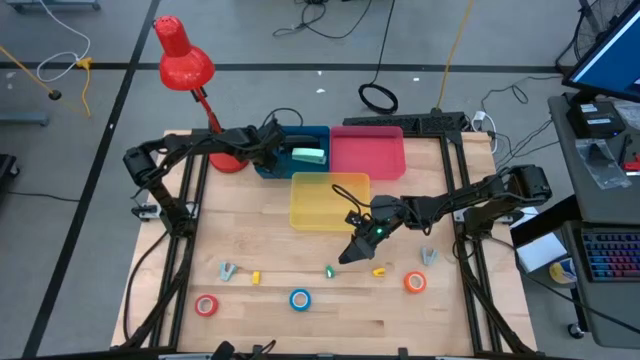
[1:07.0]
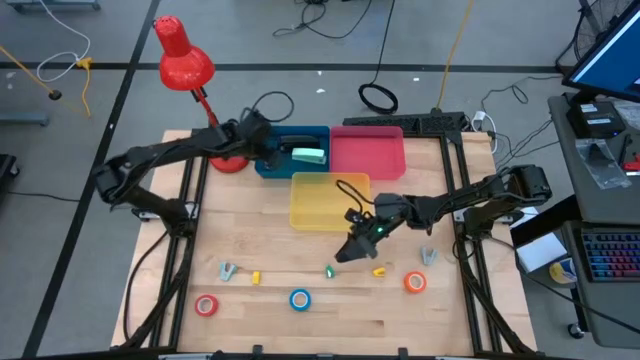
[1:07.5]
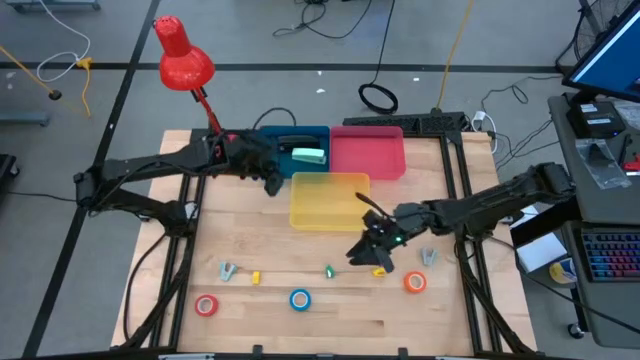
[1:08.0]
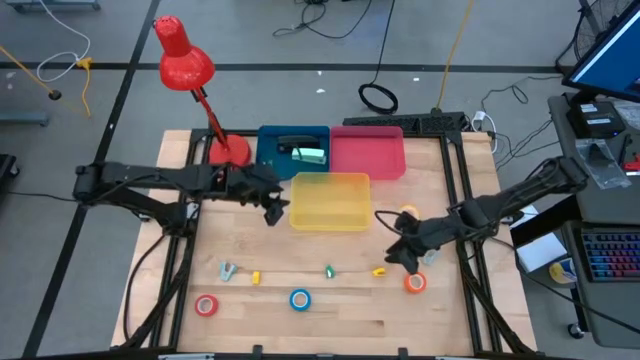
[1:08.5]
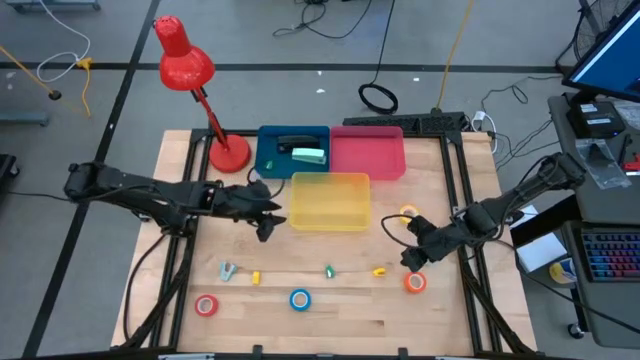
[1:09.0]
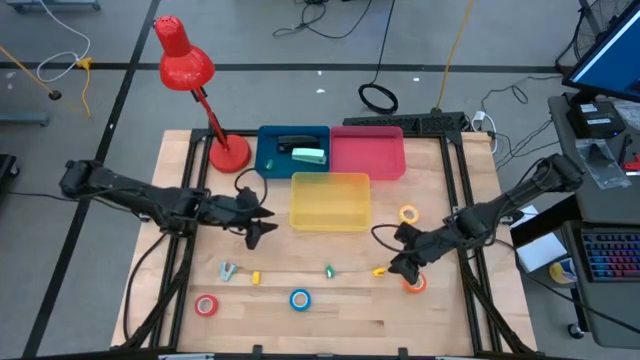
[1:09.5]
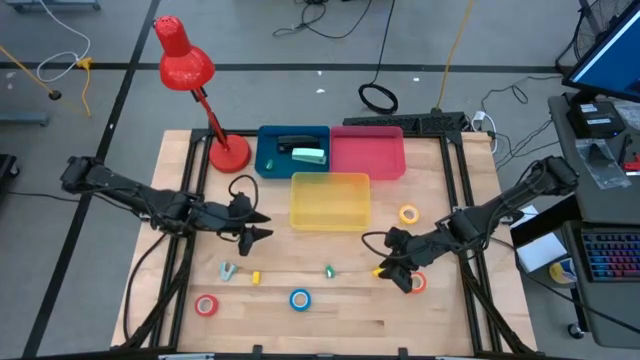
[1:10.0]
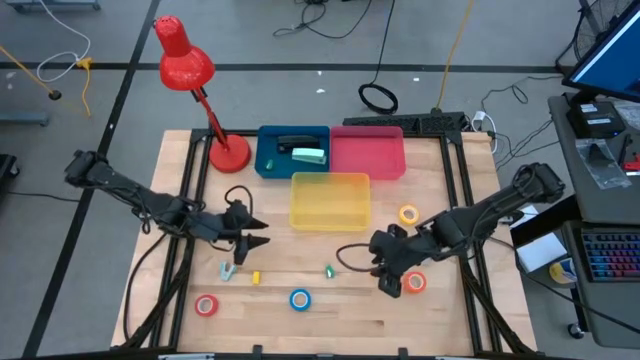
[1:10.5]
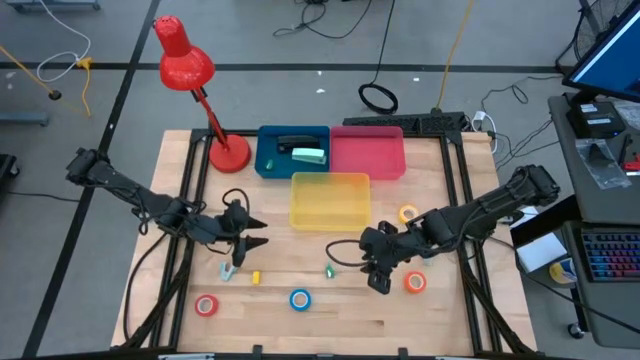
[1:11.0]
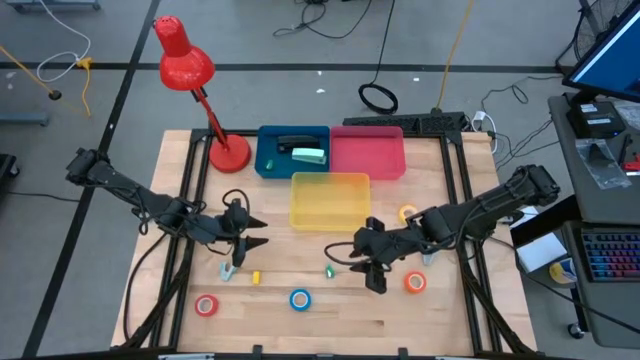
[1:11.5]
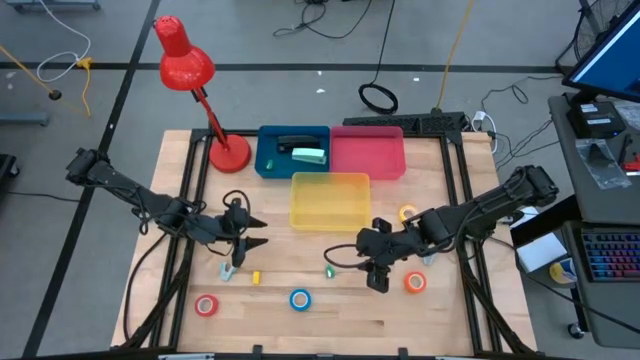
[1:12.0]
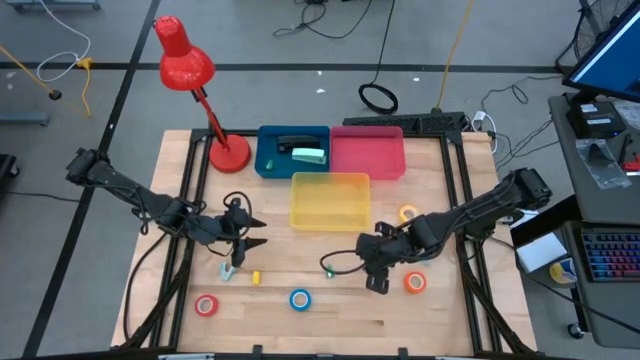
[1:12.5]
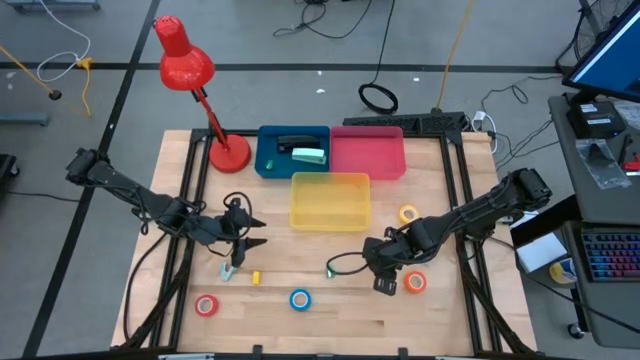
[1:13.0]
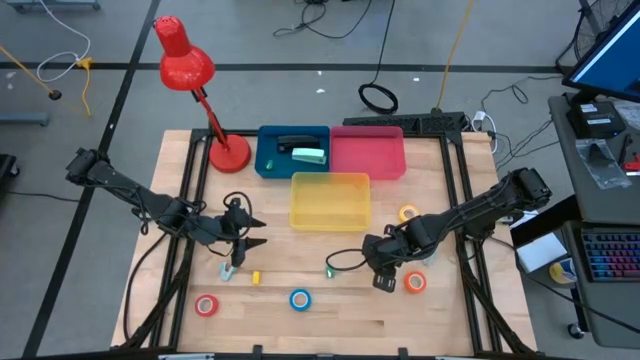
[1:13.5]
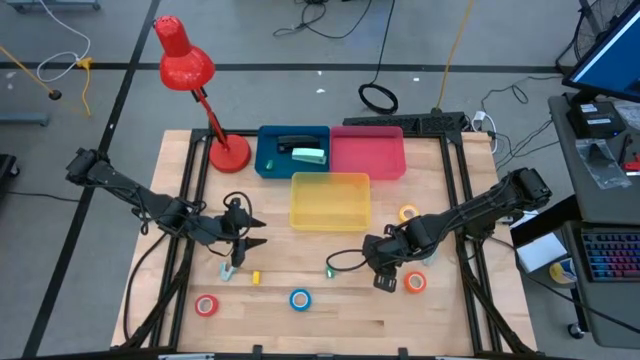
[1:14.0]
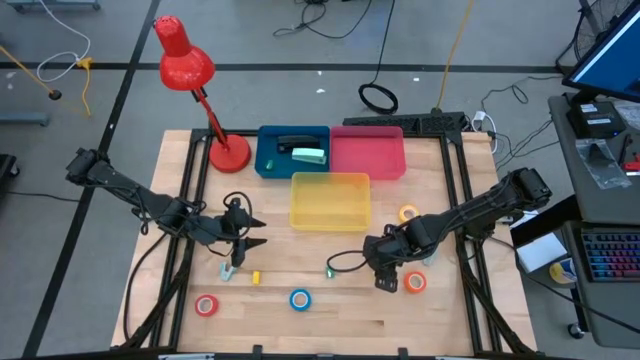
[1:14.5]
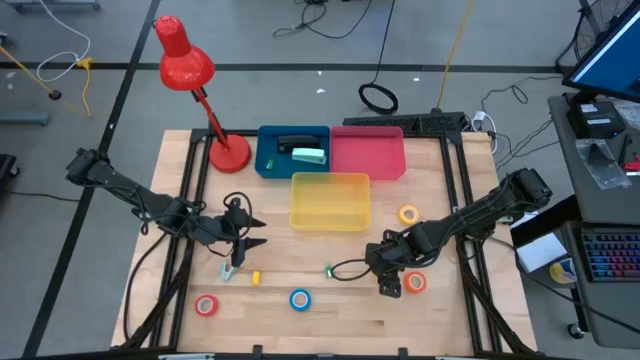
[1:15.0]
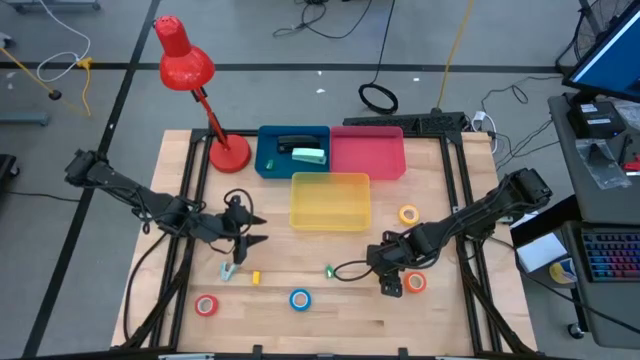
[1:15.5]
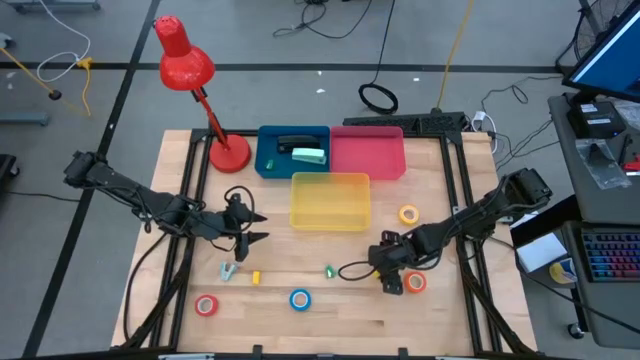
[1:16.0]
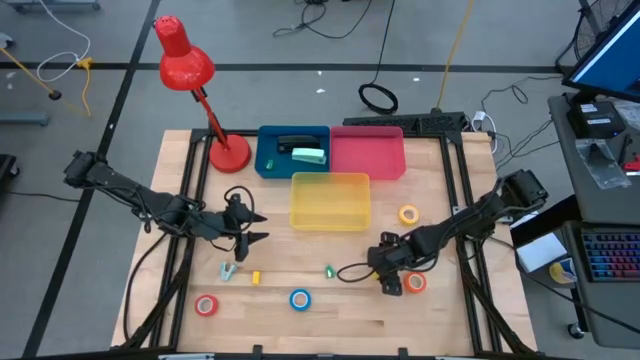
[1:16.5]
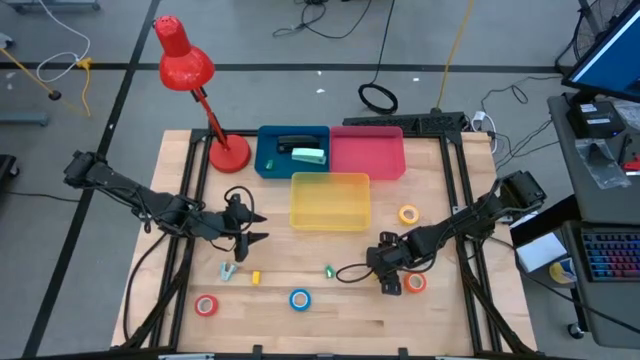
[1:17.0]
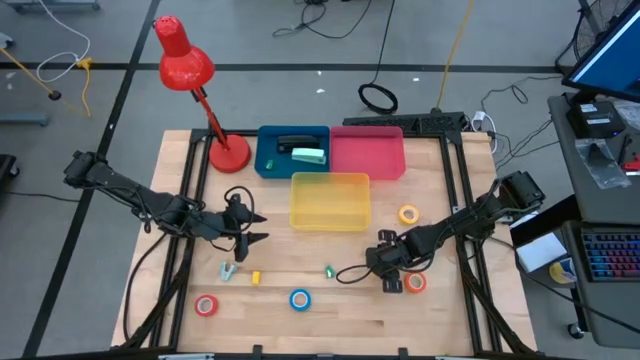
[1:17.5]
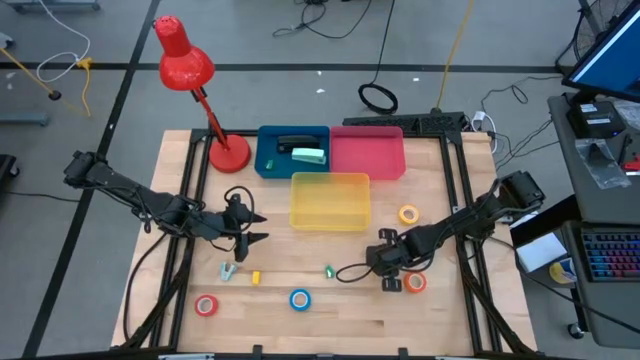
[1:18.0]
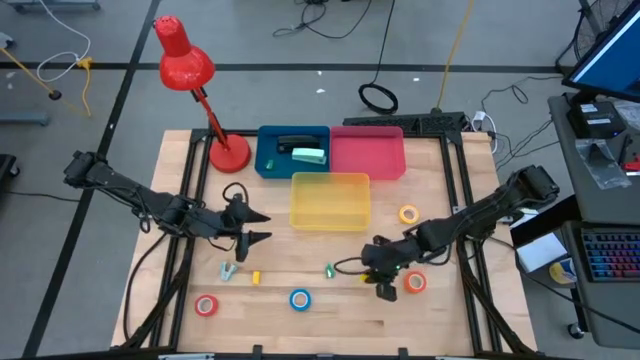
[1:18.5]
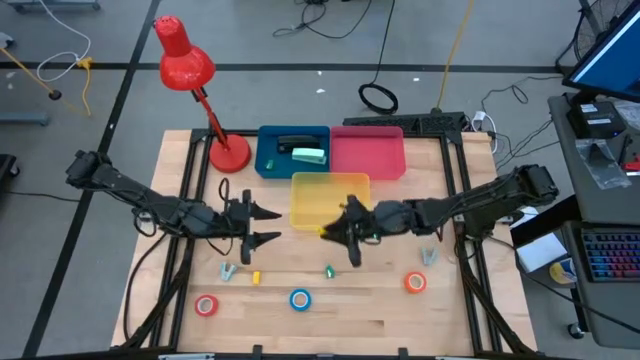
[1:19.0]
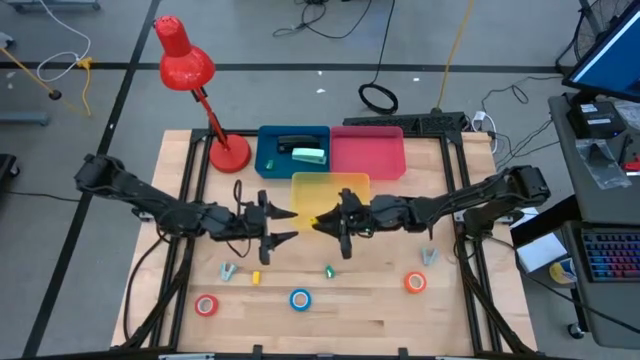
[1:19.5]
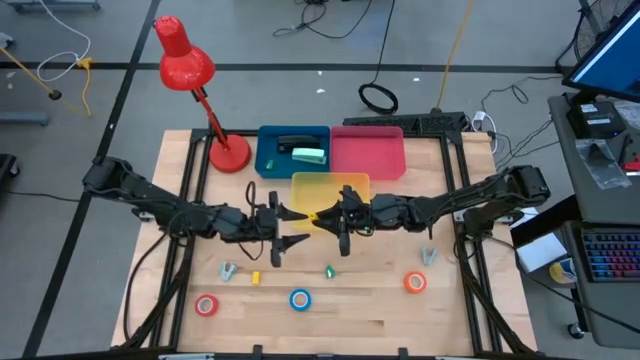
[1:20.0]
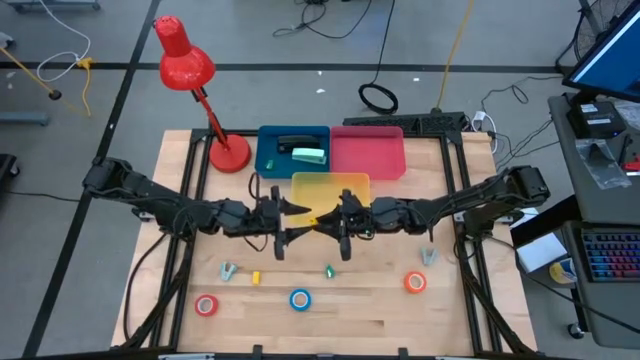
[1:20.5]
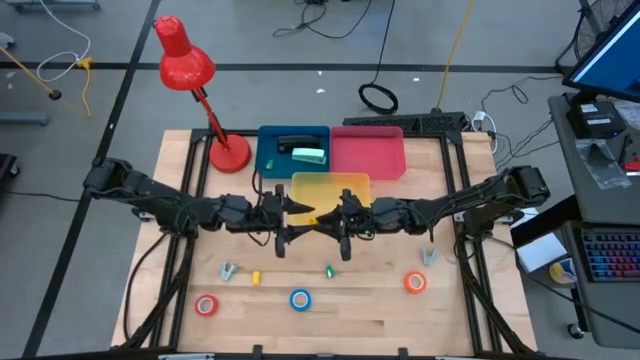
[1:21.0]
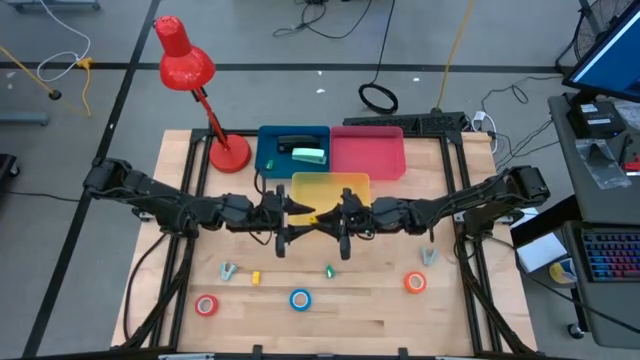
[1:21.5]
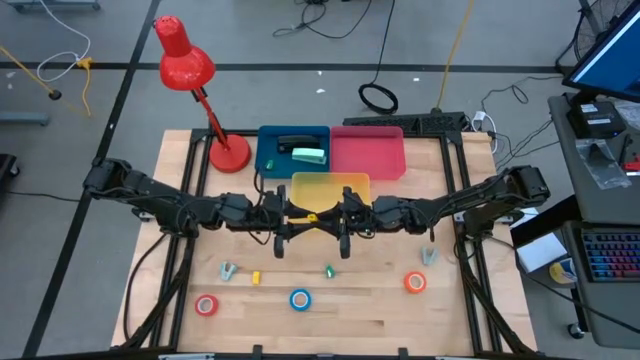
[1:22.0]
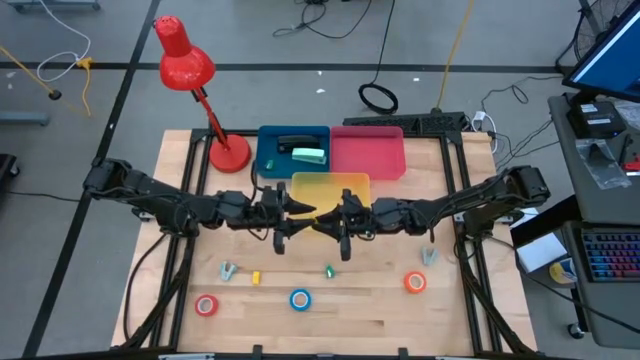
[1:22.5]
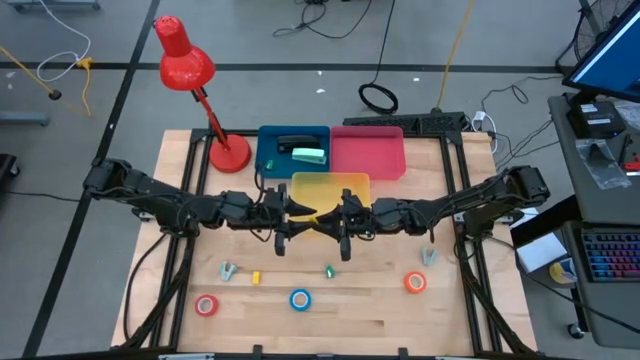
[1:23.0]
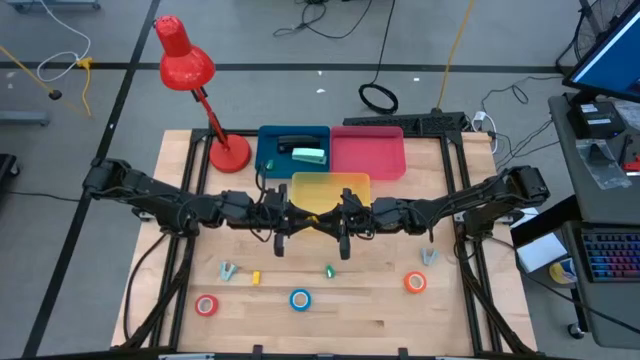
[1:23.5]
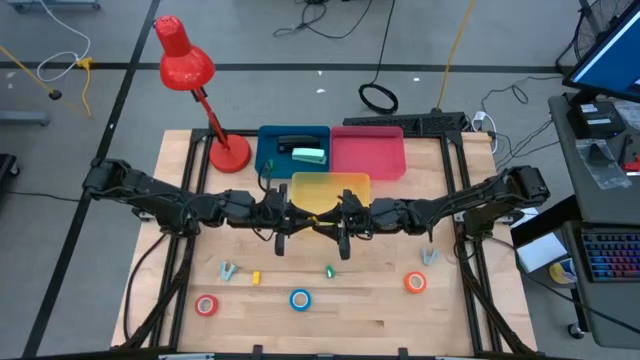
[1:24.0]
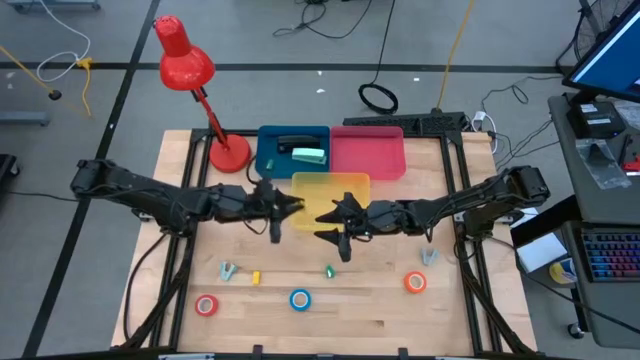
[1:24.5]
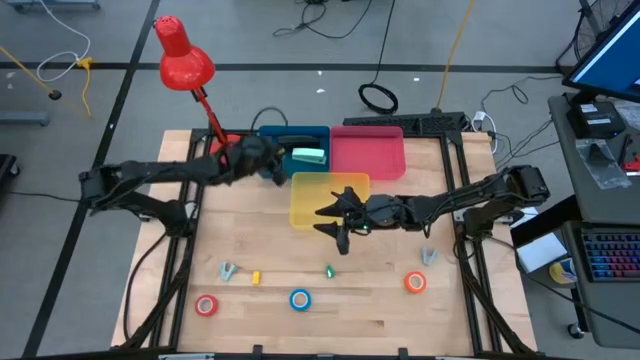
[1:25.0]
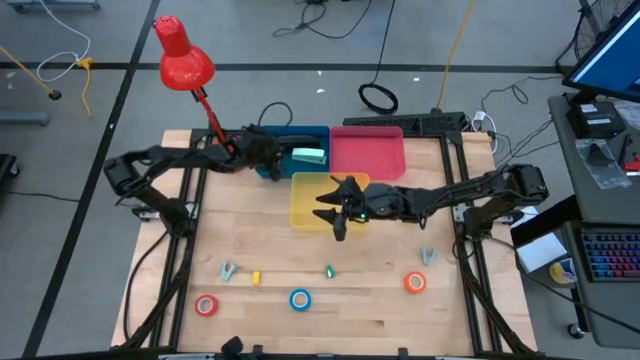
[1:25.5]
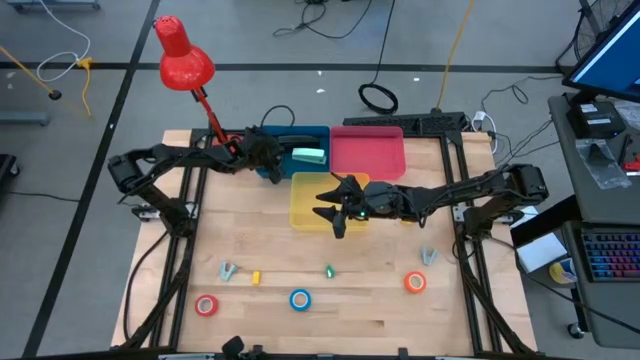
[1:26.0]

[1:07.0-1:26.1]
Task: Pick and place Stapler, Stapler remover, tape
Put the right yellow stapler into the blue bin

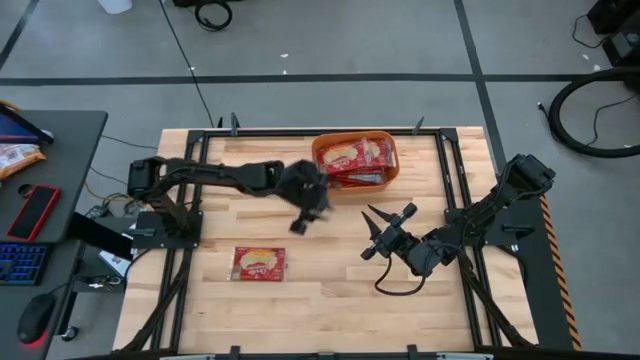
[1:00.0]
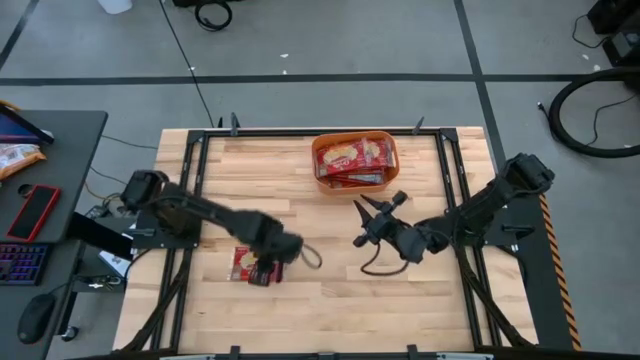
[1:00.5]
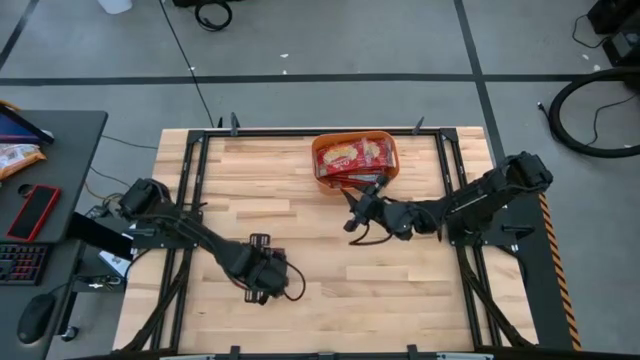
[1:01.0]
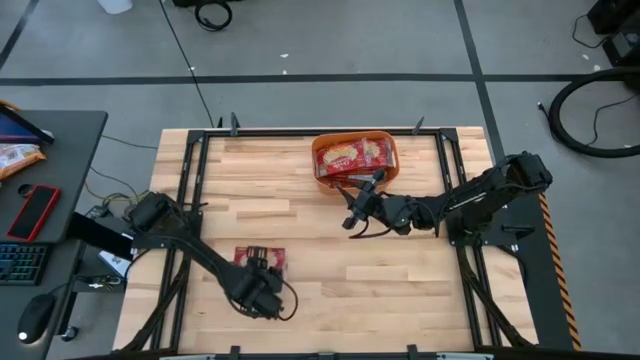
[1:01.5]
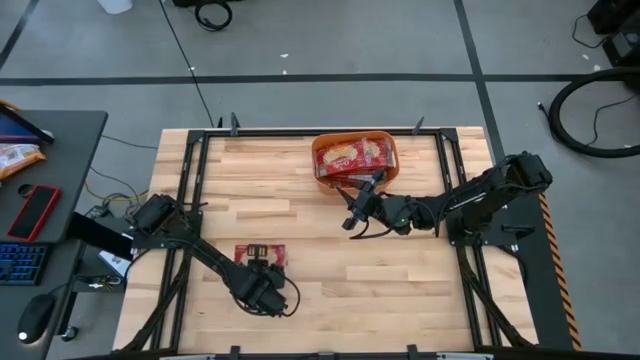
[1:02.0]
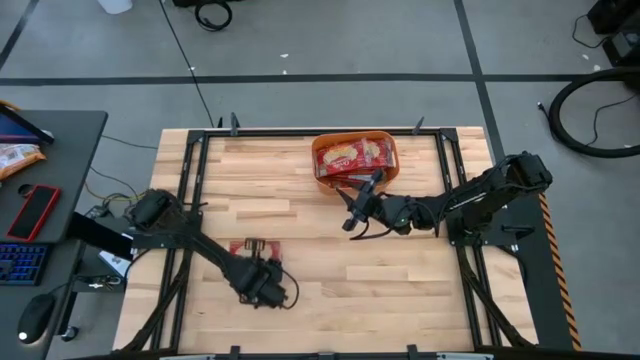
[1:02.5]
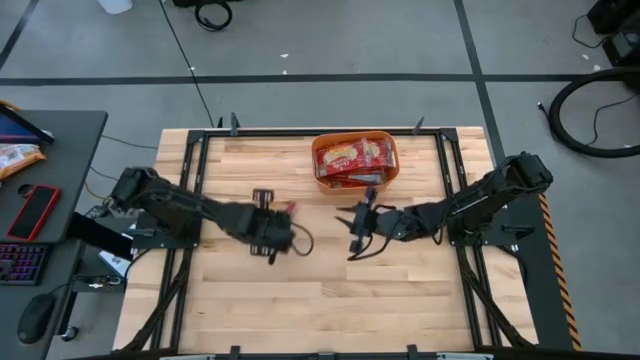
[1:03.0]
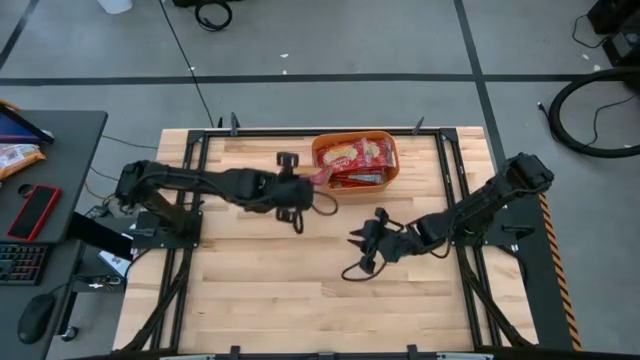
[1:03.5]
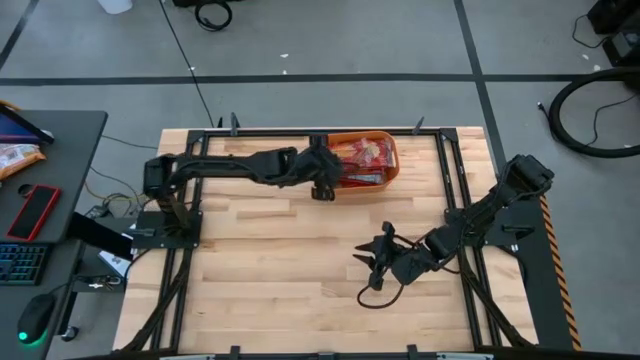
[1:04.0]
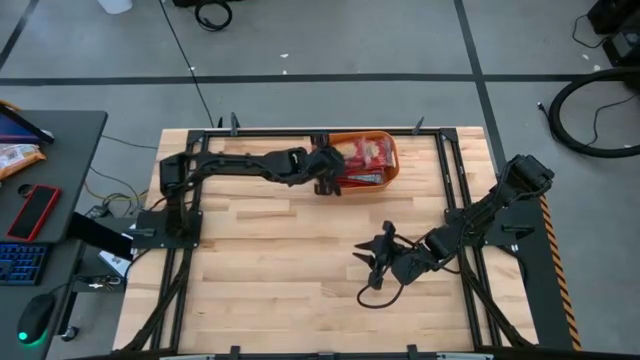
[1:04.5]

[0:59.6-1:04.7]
Task: Sort popcorn bags into baskets
Stack the popcorn bag on top of the other popcorn bag into the orange container
